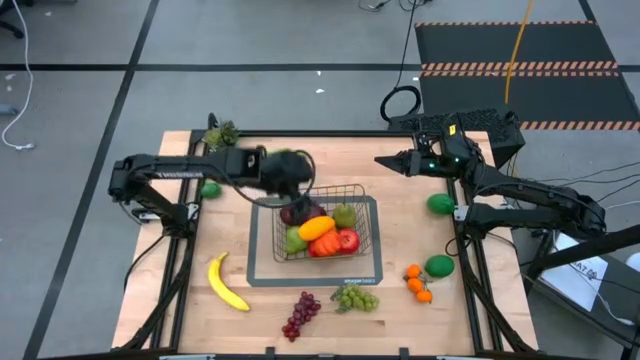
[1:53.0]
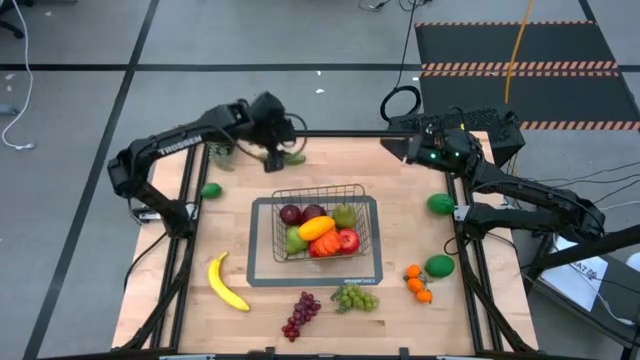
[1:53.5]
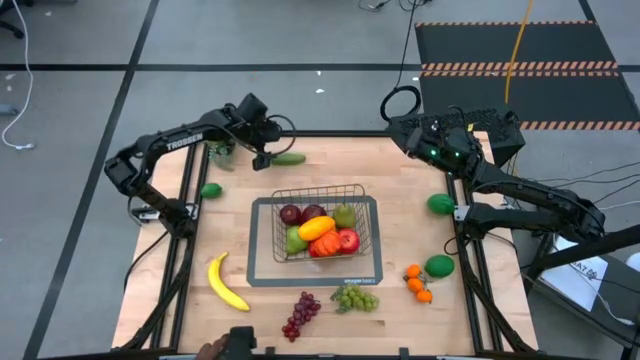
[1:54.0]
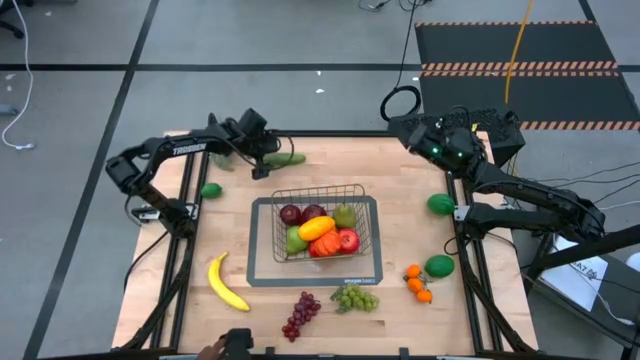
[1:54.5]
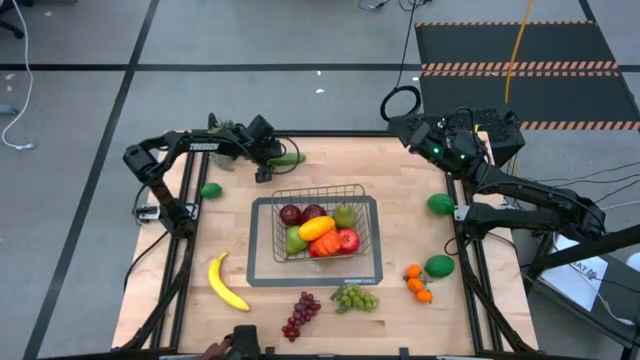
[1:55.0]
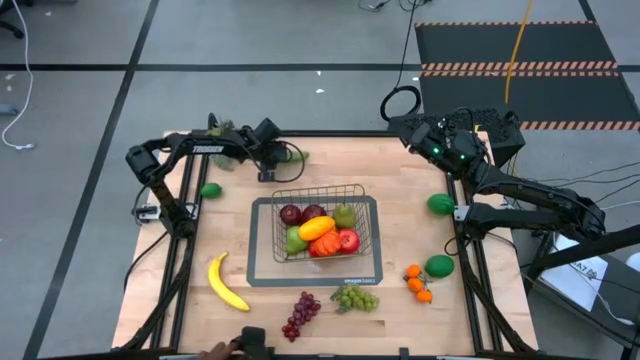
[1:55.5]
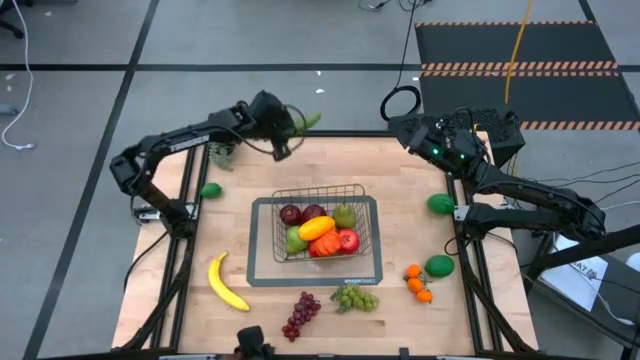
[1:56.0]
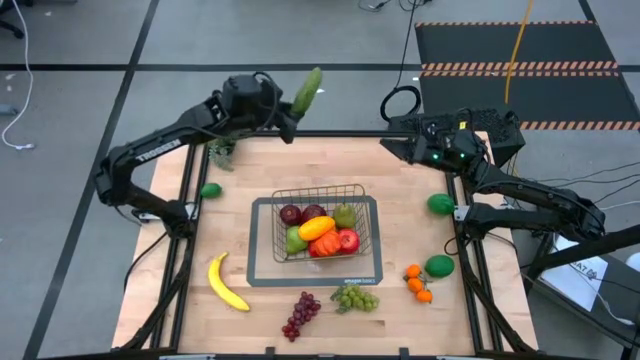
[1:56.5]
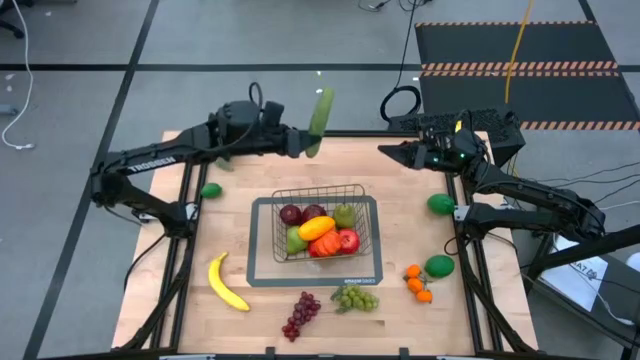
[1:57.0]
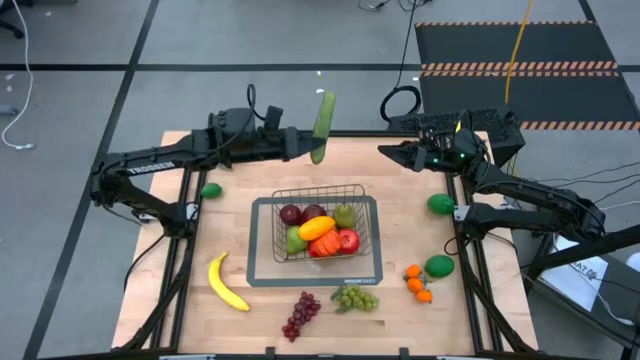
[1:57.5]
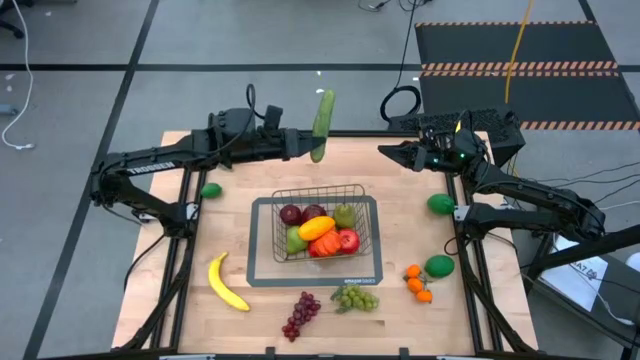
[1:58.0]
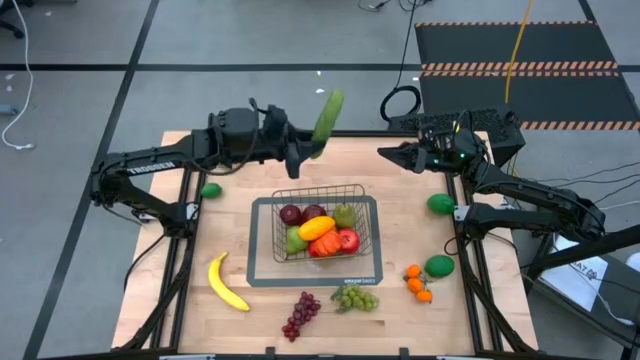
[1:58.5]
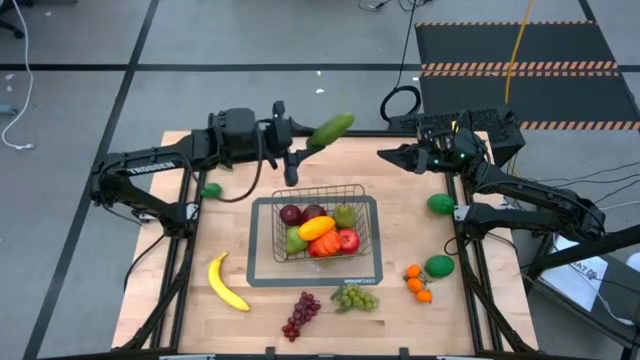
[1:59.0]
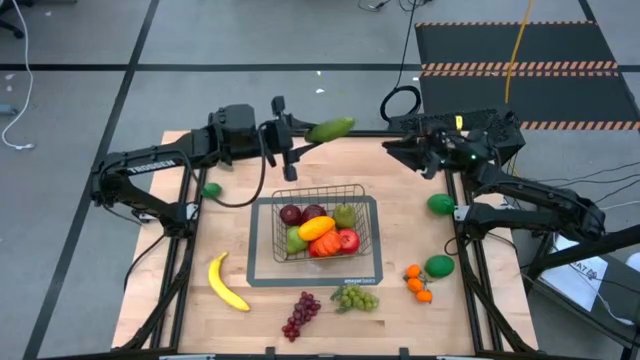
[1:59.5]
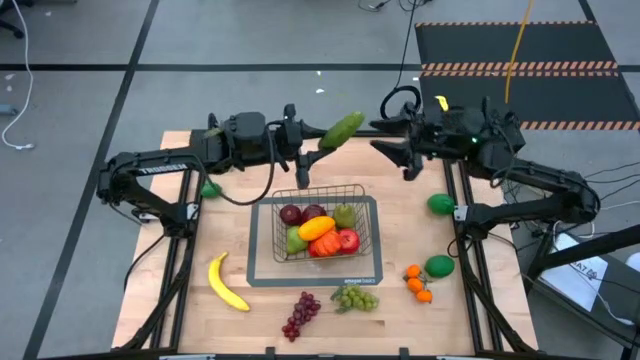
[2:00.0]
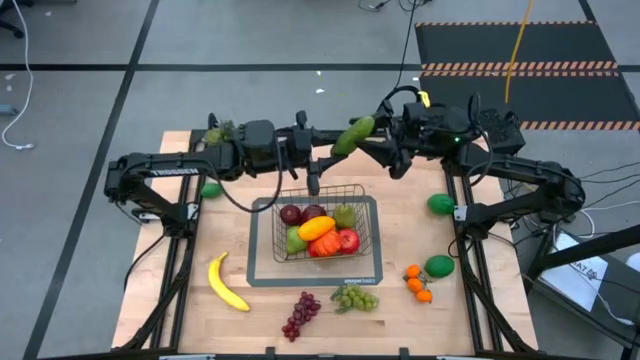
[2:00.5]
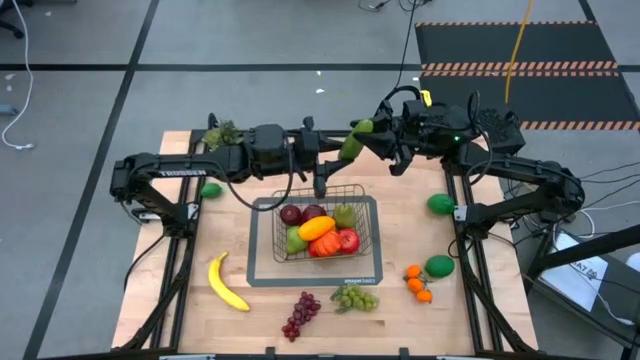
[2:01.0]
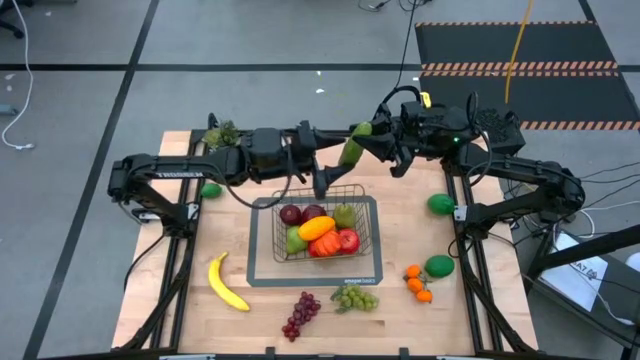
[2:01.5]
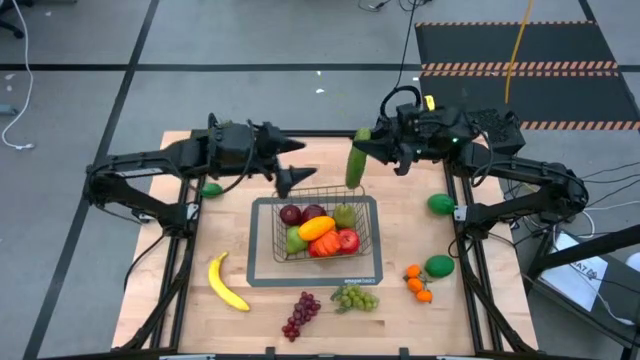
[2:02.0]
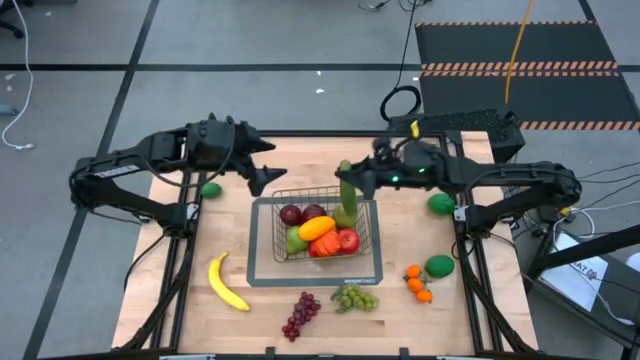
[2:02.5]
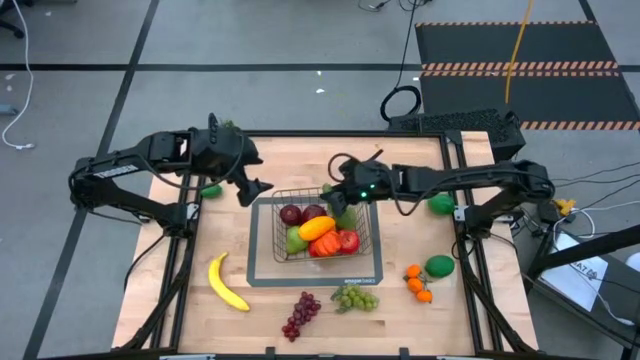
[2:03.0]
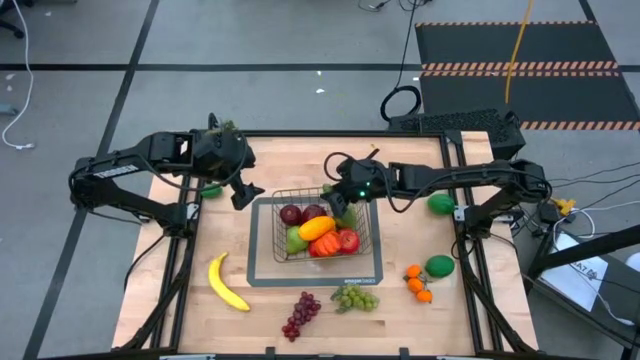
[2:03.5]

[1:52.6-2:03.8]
Task: Build produce basket
Put the cucumber into the gold wire basket

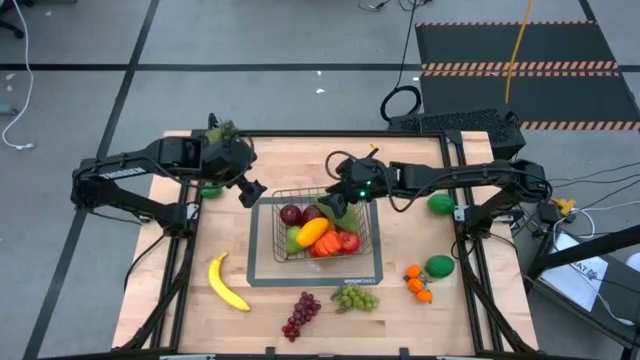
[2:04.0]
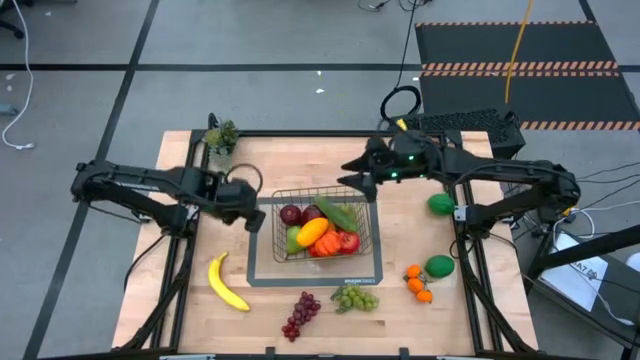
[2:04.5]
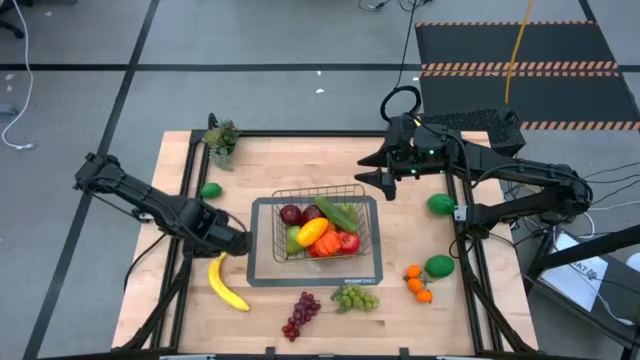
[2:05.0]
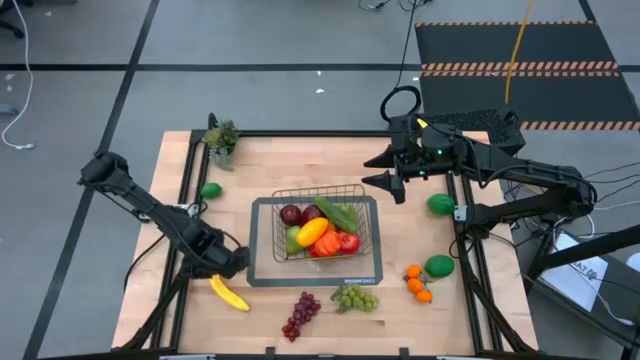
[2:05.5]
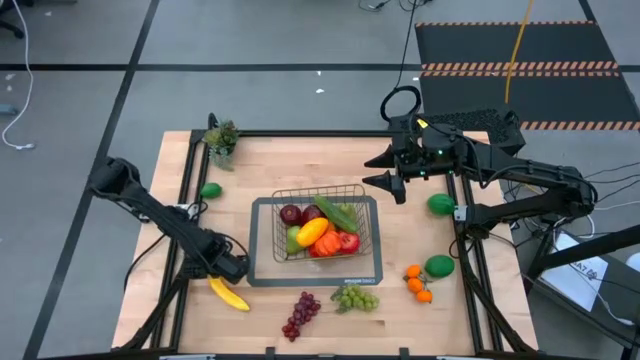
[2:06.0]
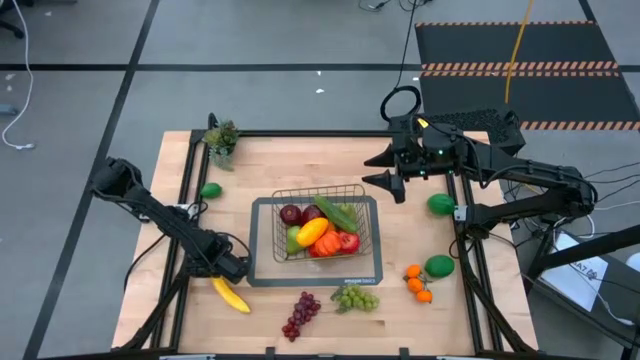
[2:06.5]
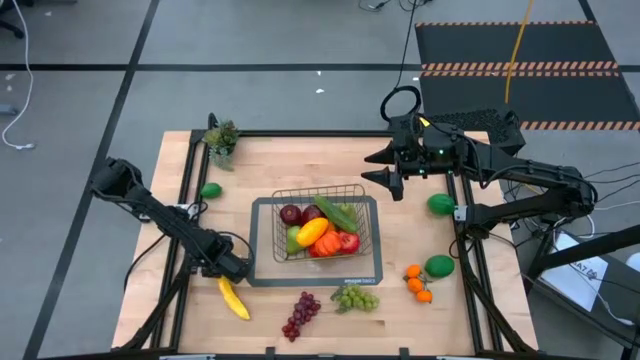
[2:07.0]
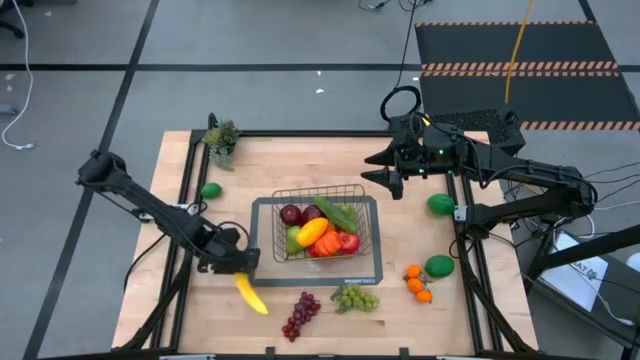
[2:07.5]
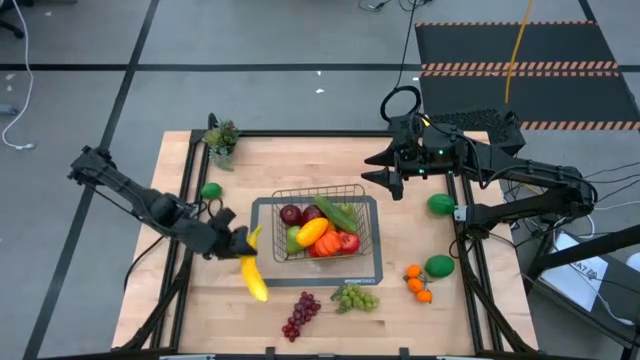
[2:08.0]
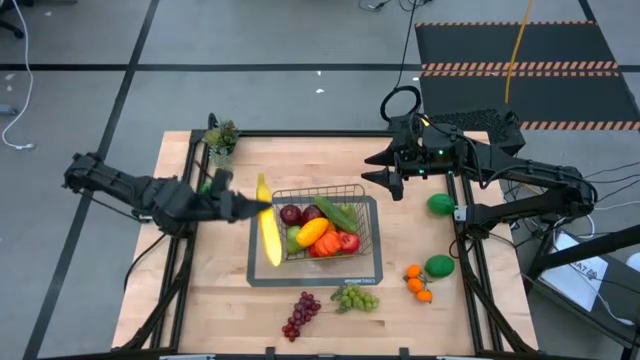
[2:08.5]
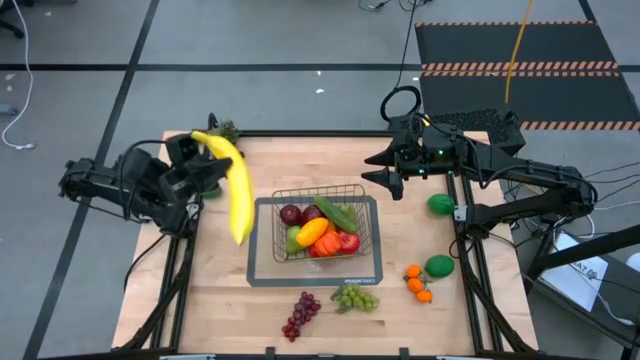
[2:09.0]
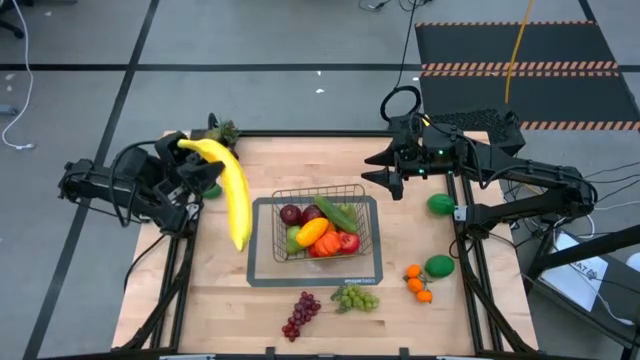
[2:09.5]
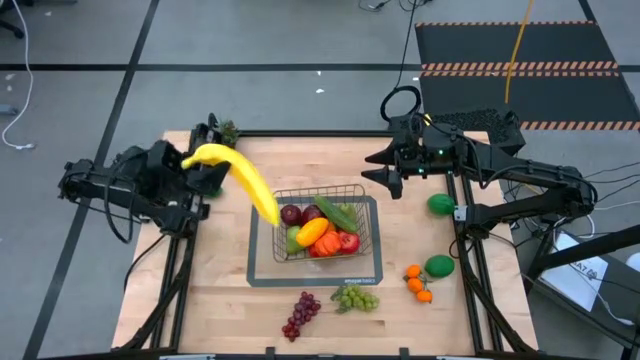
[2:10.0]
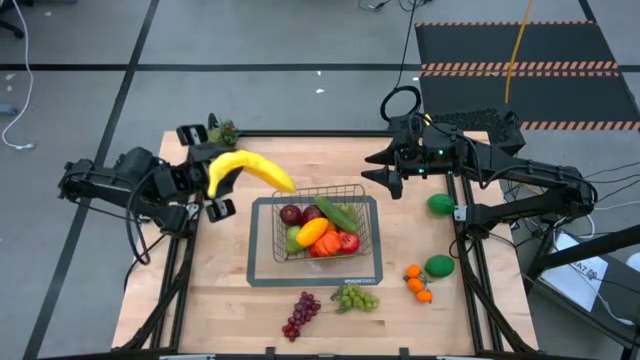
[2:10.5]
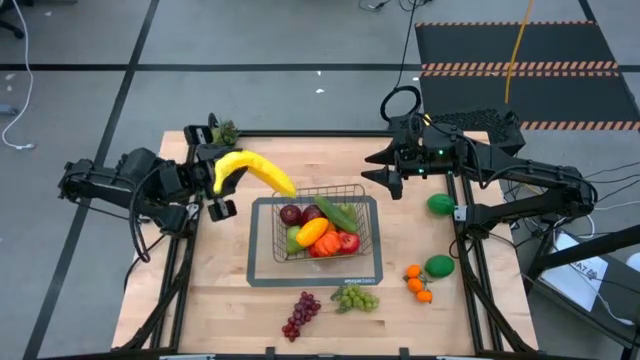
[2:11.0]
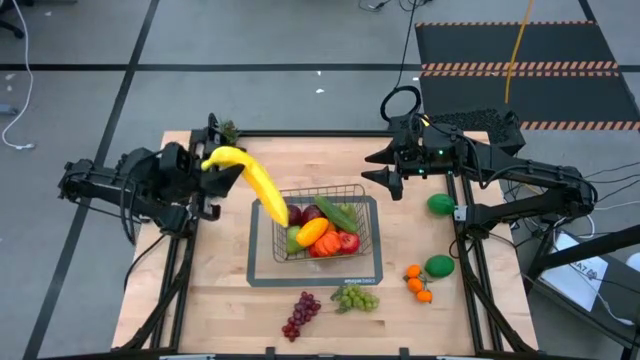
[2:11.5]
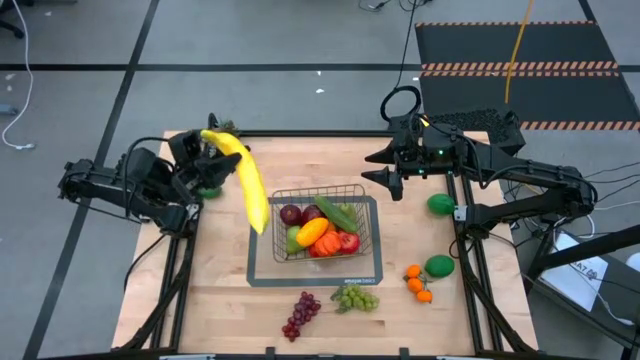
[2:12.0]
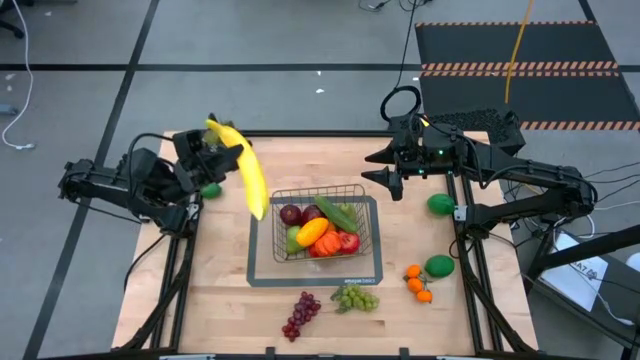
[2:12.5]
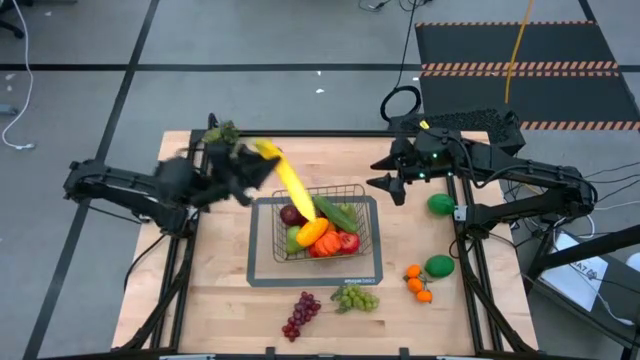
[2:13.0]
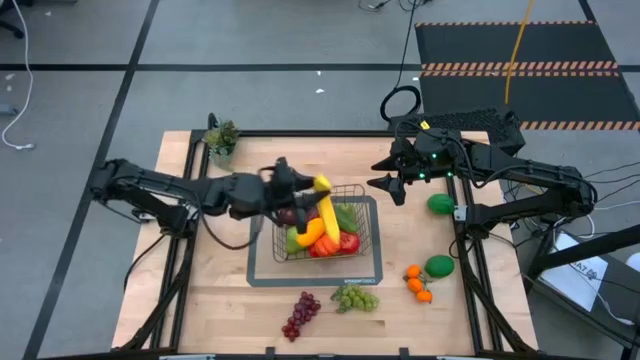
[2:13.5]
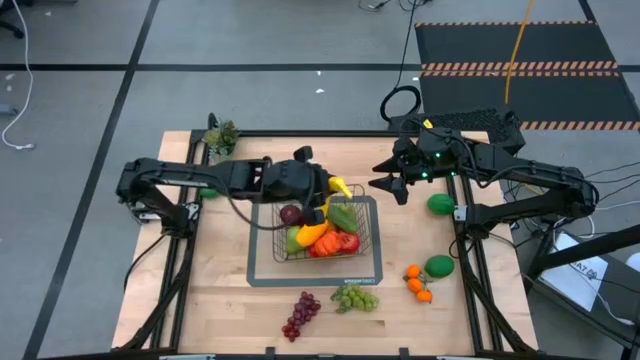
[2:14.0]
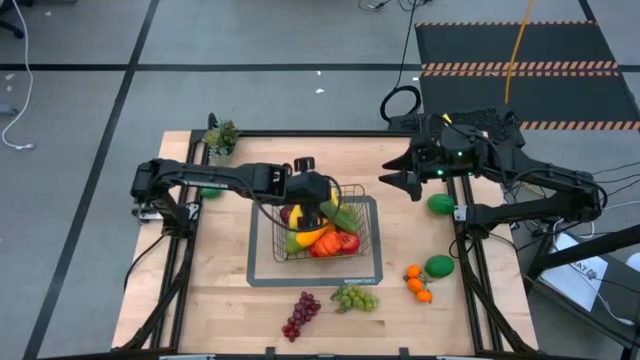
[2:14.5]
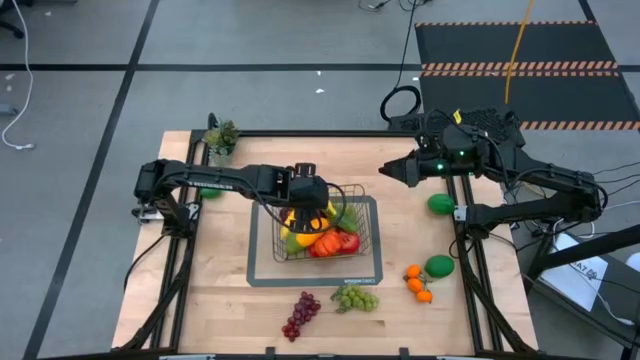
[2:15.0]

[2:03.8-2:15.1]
Put the banana into the gold wire basket
